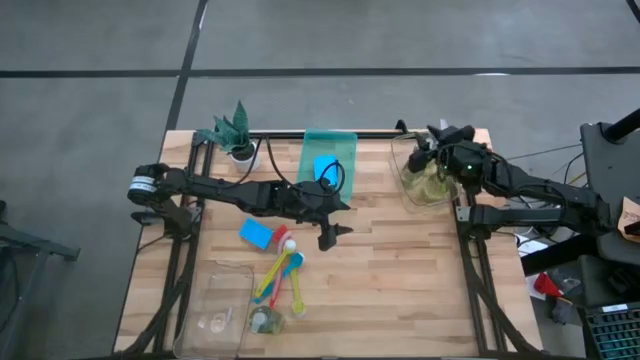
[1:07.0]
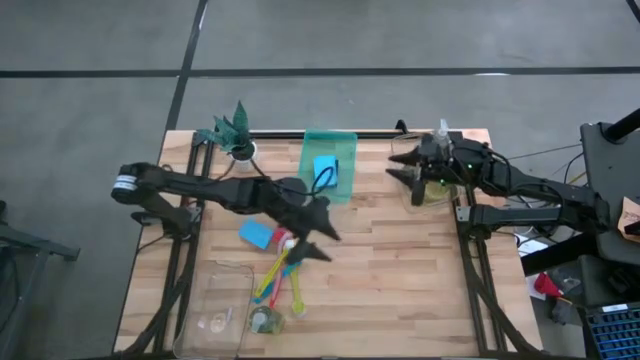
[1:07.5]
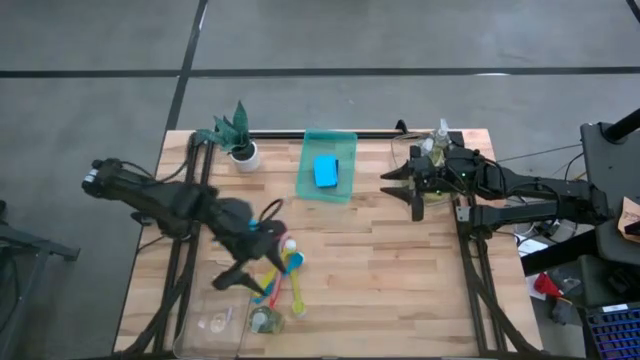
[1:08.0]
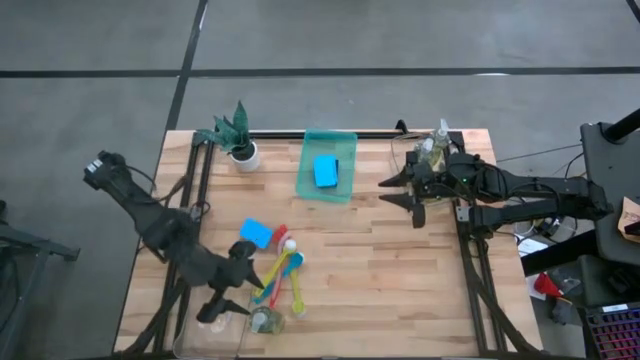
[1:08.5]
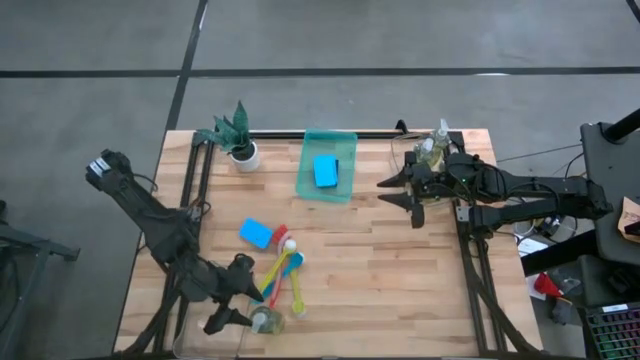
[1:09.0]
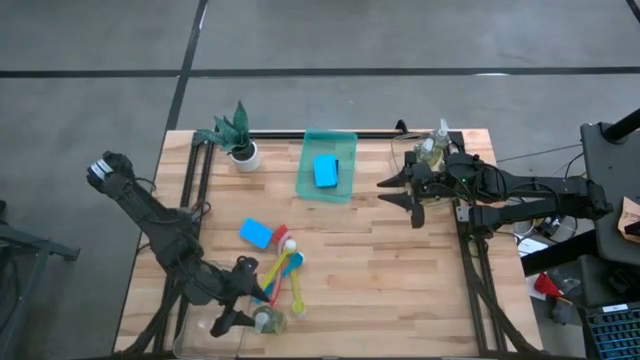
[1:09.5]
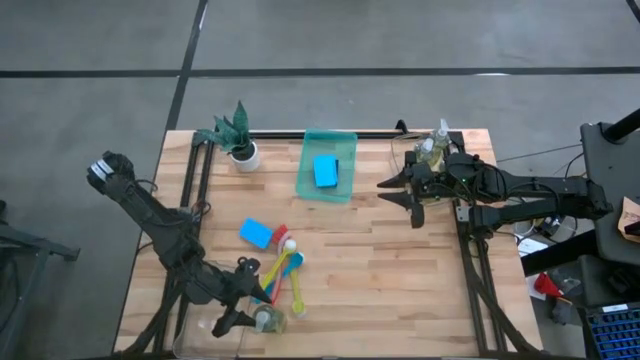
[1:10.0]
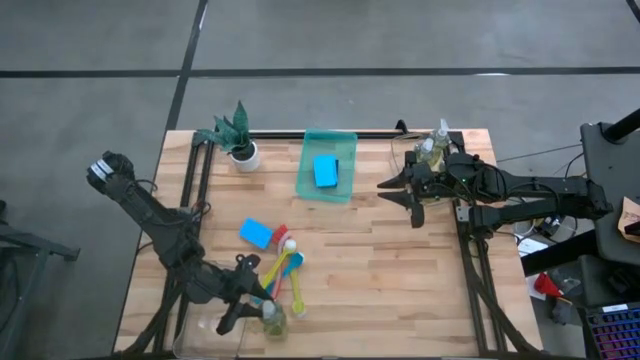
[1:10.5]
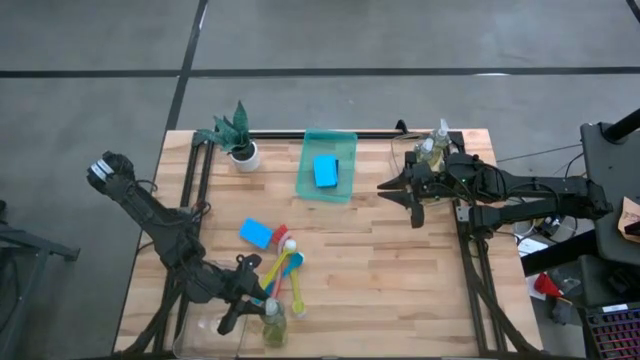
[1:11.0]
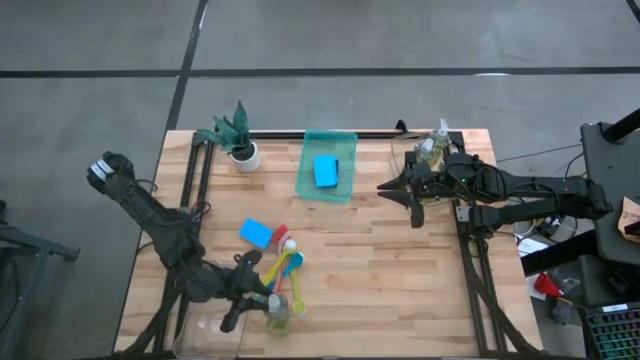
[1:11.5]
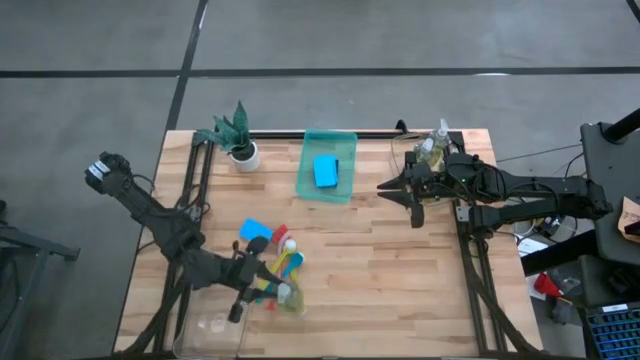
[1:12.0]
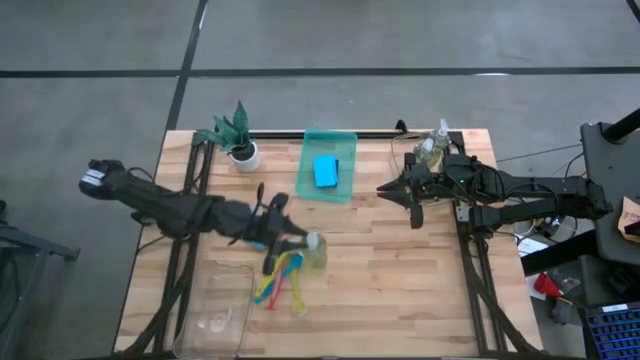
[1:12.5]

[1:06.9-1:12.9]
Task: Pick & Place Kitchen Sink Supplies
Put the yellow soap dispenser into the top transparent bin

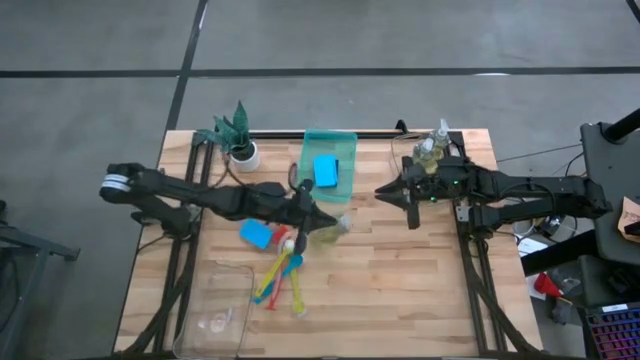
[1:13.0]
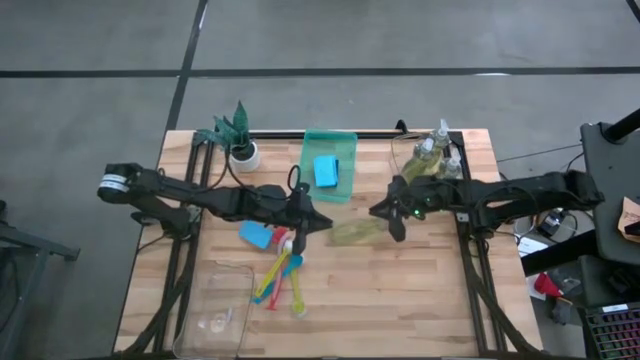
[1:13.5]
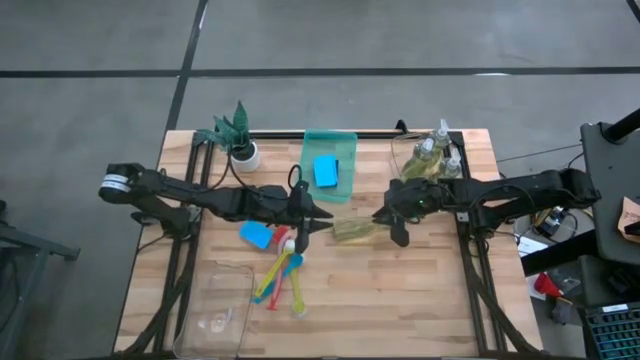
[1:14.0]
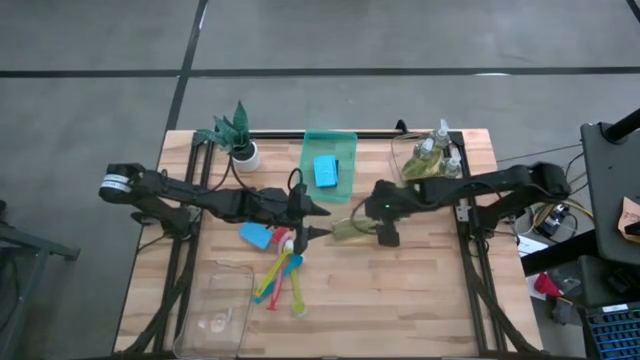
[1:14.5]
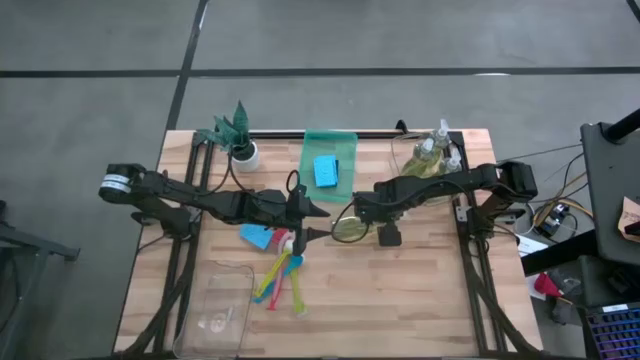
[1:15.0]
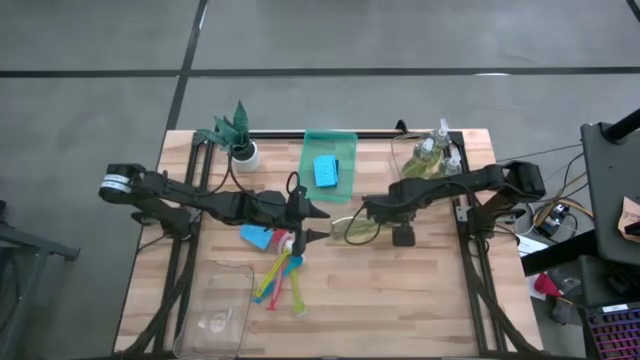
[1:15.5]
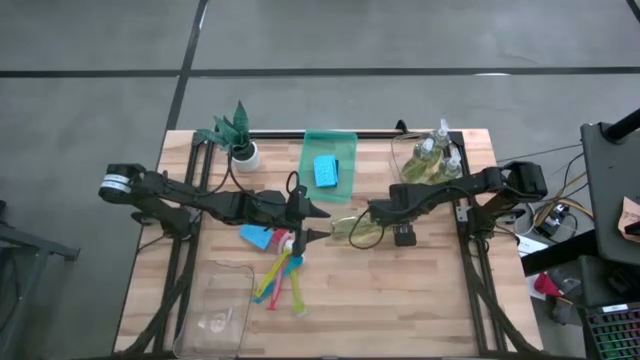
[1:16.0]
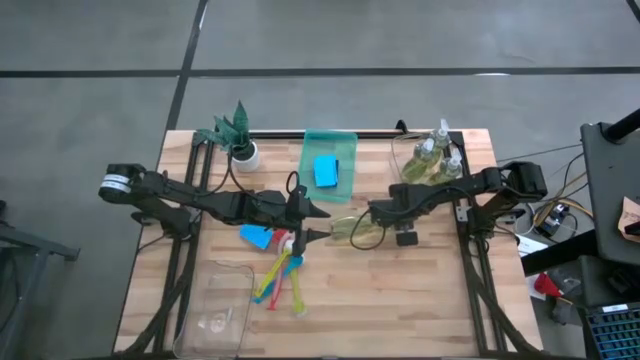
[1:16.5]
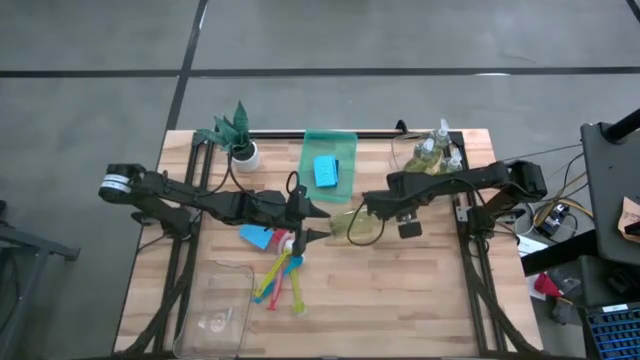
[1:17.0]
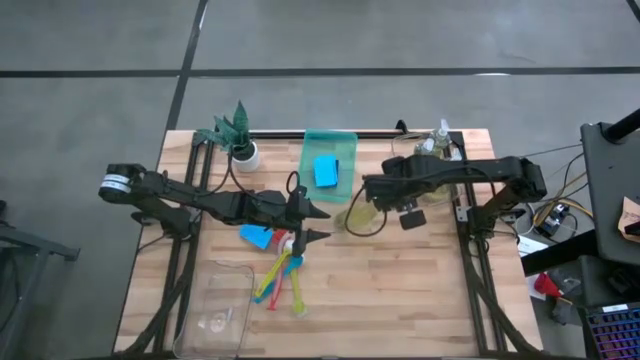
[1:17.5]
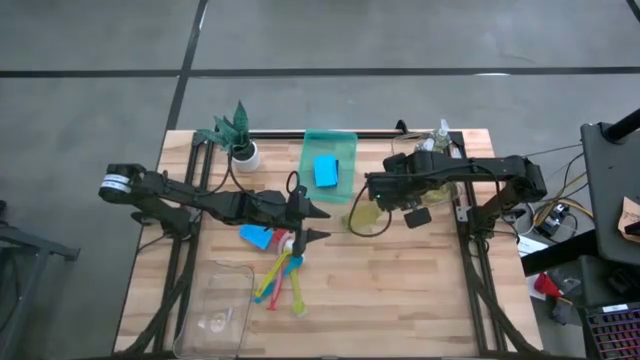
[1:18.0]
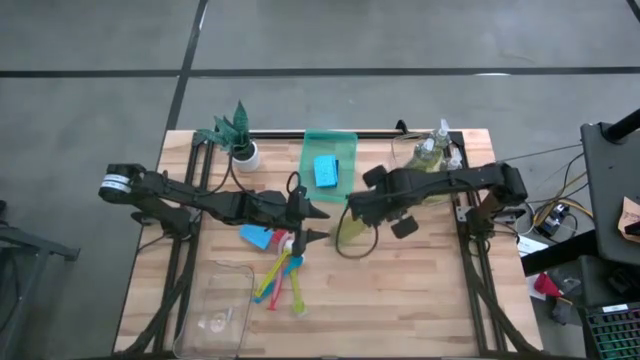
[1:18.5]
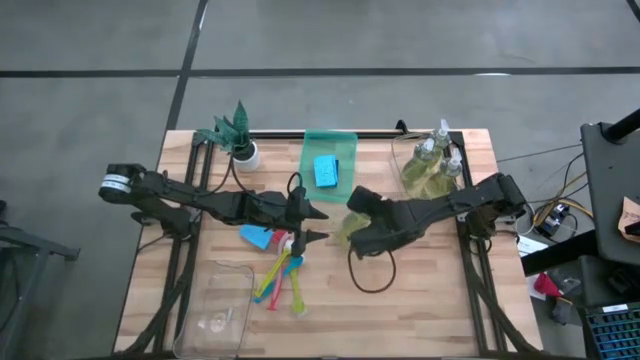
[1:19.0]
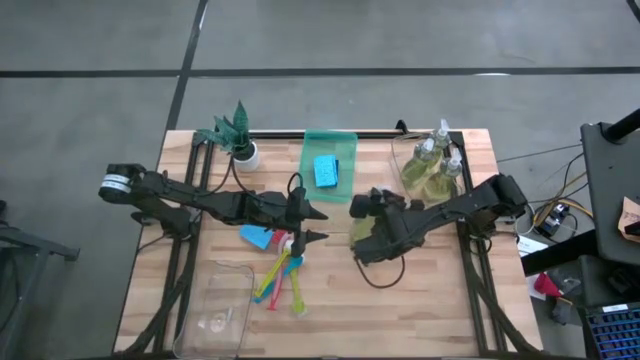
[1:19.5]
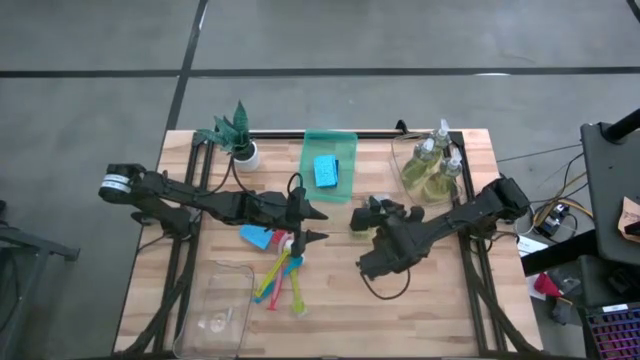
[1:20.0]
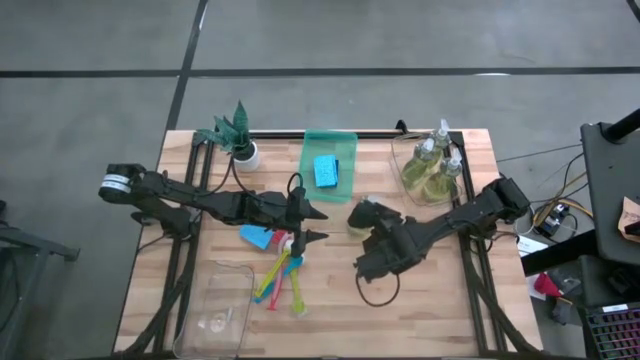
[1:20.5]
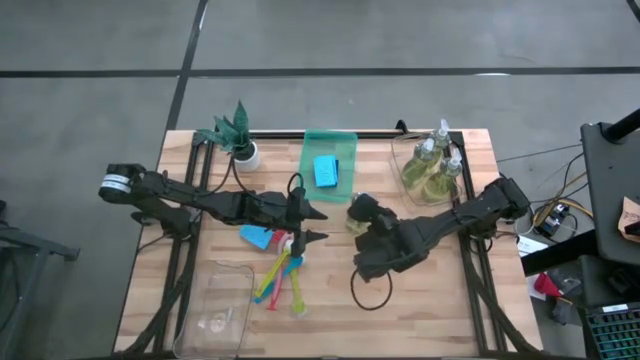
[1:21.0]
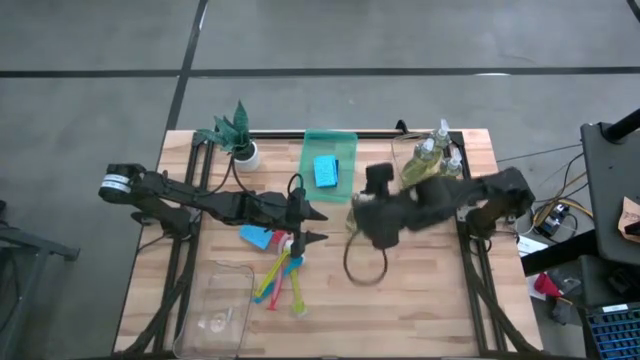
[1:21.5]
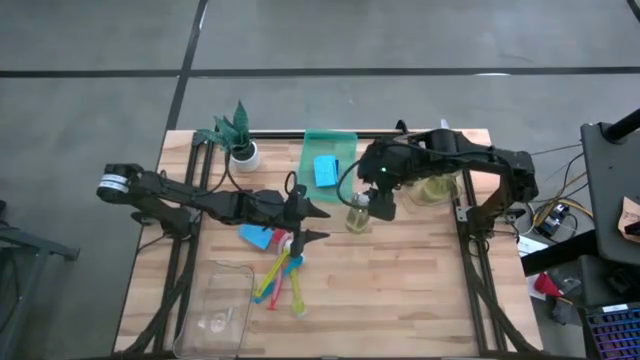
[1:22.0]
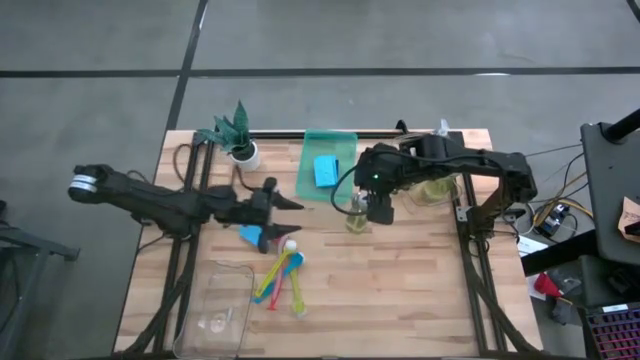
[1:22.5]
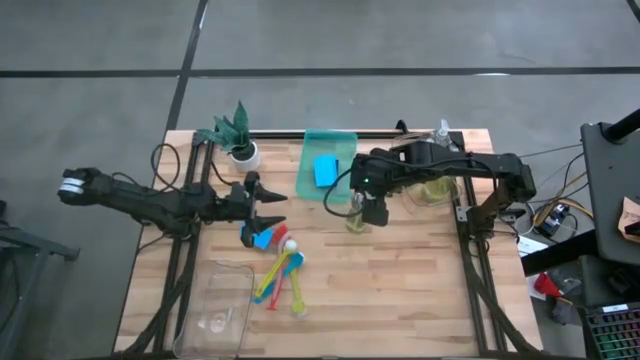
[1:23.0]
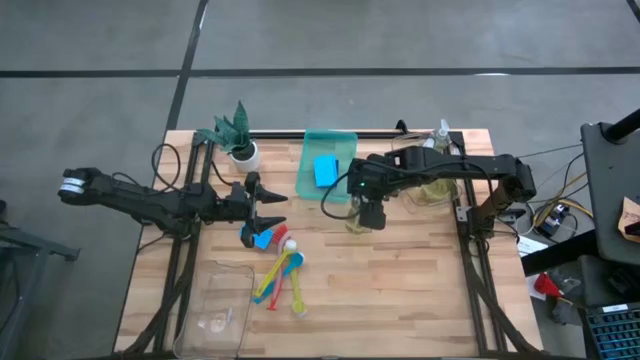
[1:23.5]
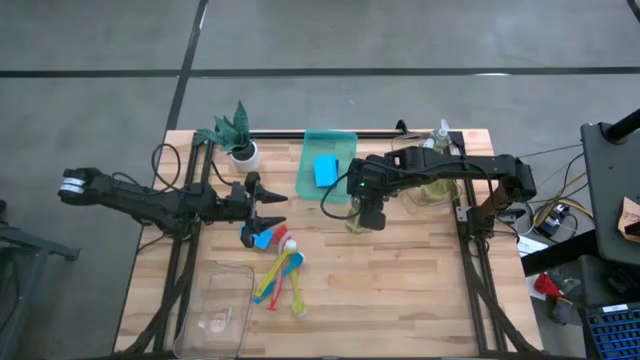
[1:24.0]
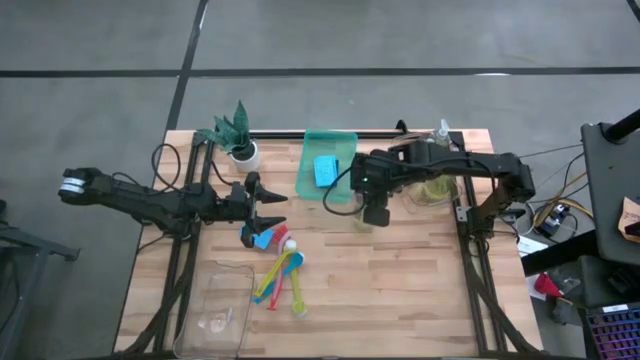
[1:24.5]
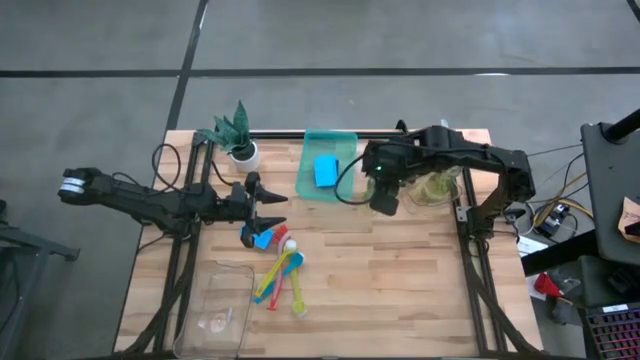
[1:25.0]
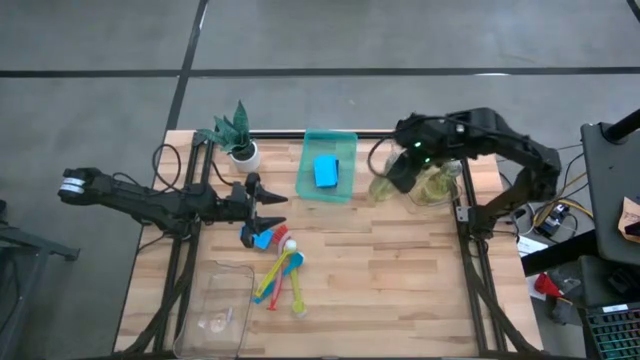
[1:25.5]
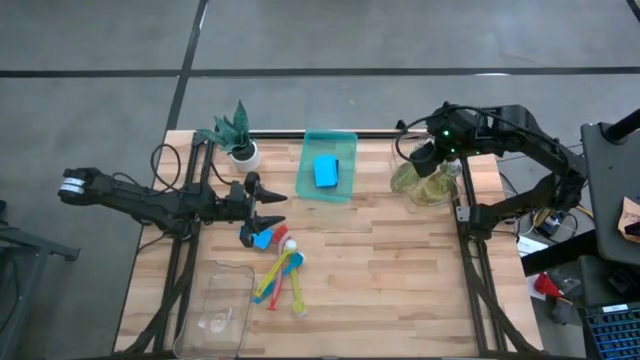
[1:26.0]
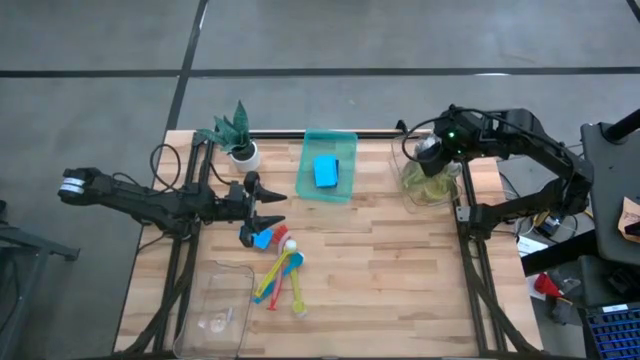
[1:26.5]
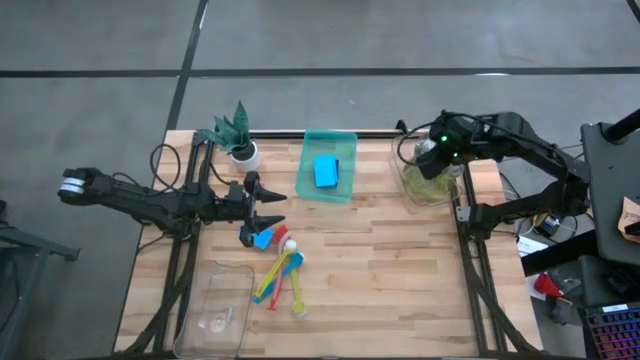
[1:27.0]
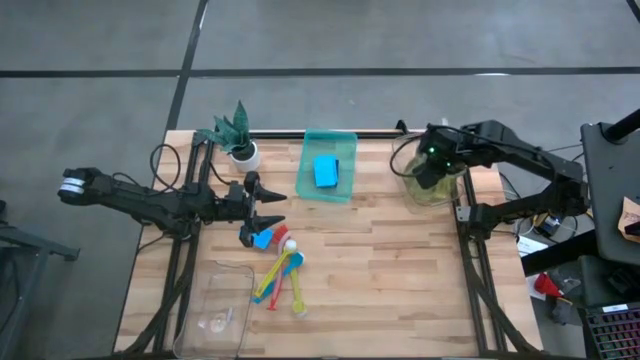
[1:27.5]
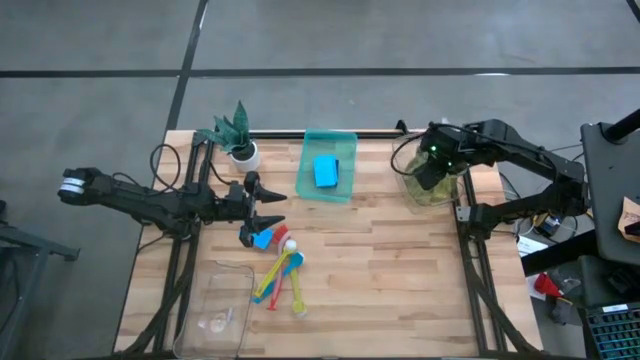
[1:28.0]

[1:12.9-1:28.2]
Put the yellow soap dispenser into the top transparent bin
